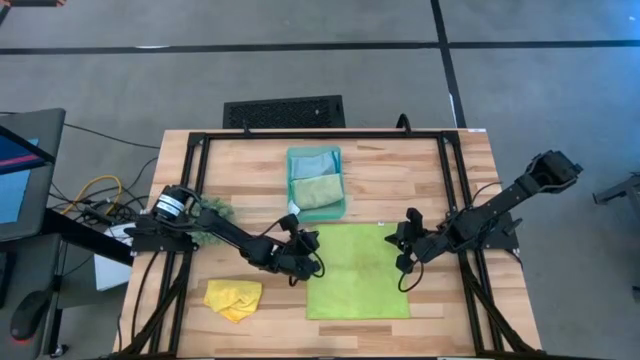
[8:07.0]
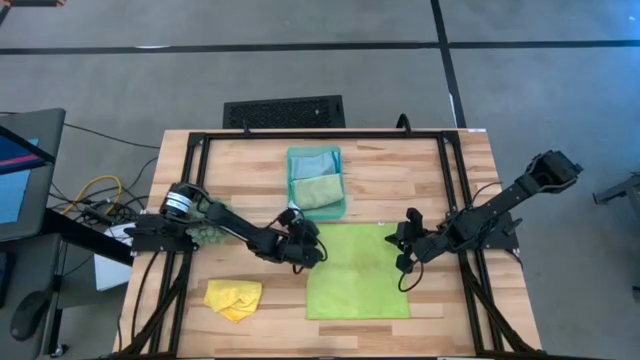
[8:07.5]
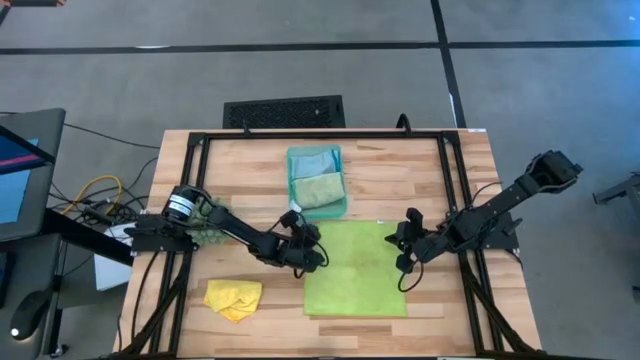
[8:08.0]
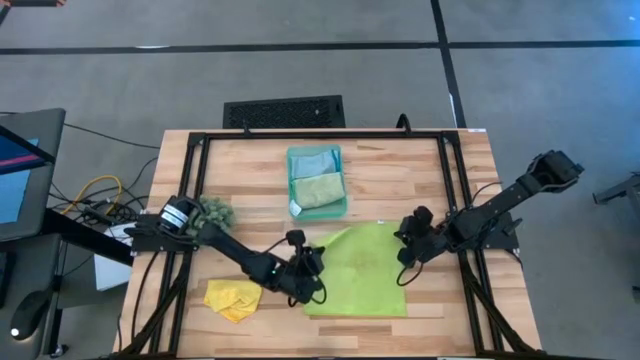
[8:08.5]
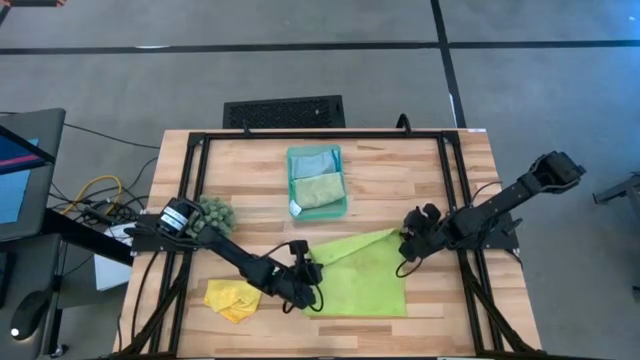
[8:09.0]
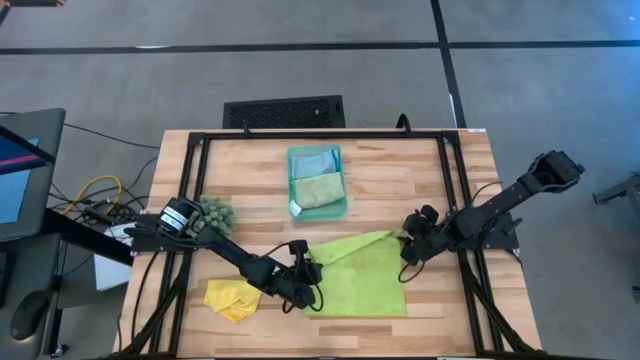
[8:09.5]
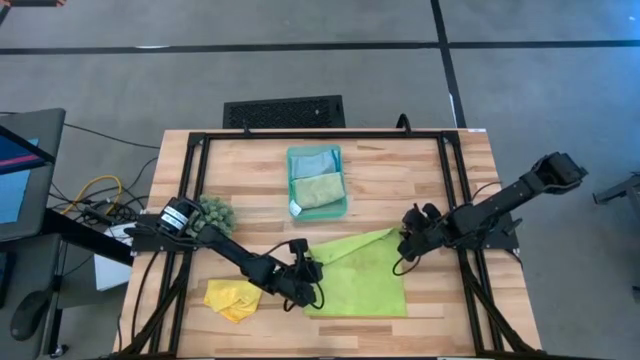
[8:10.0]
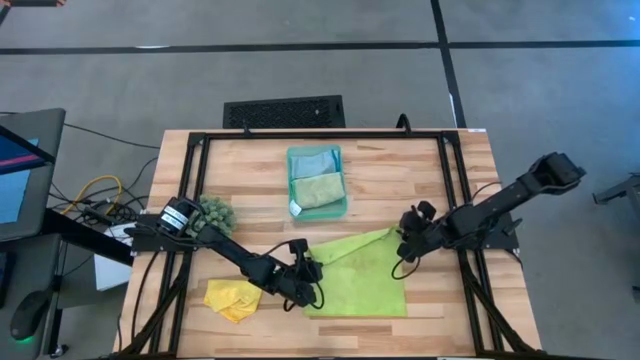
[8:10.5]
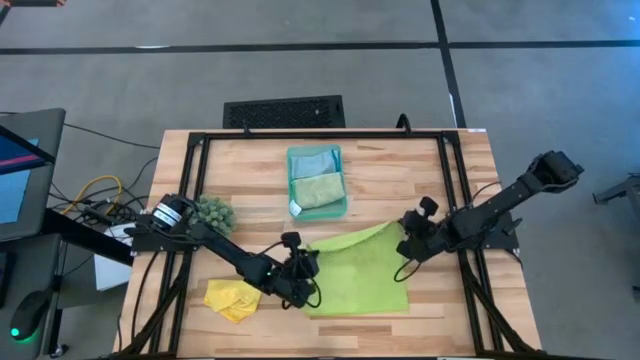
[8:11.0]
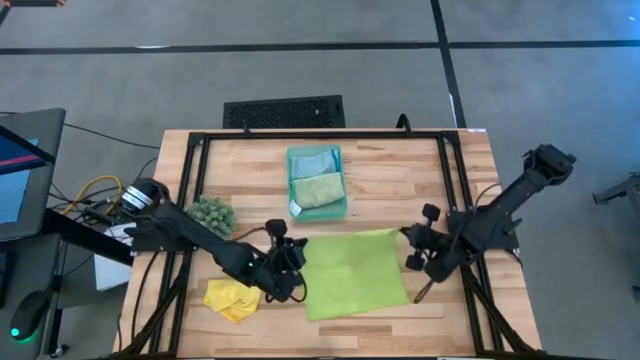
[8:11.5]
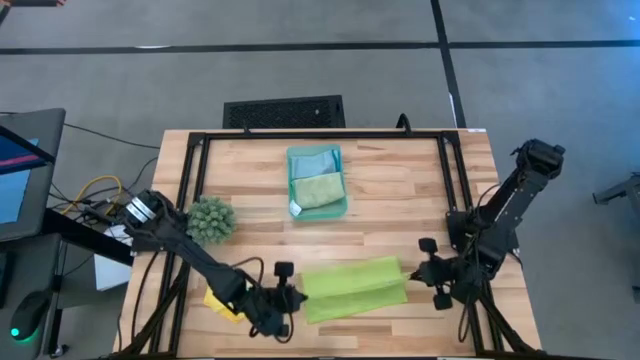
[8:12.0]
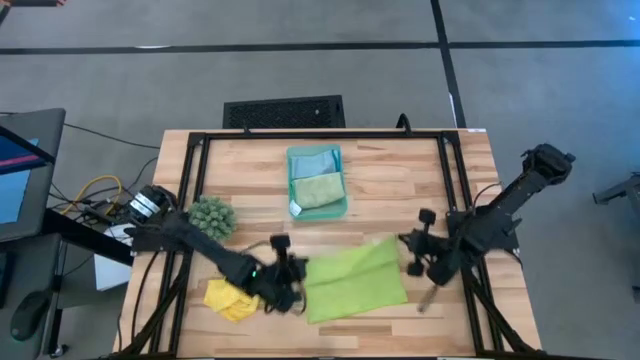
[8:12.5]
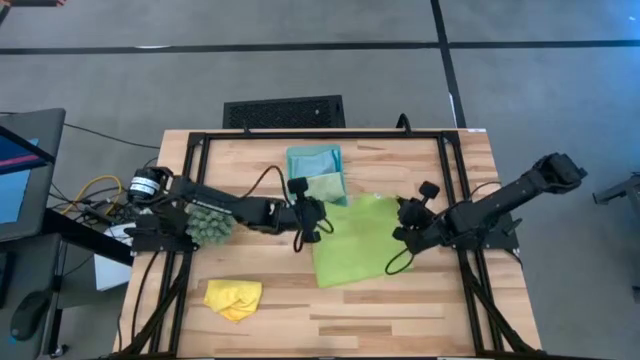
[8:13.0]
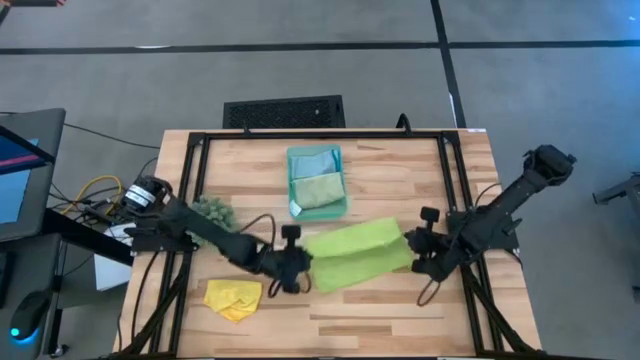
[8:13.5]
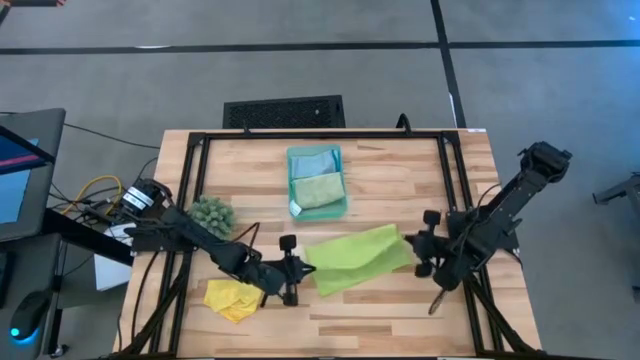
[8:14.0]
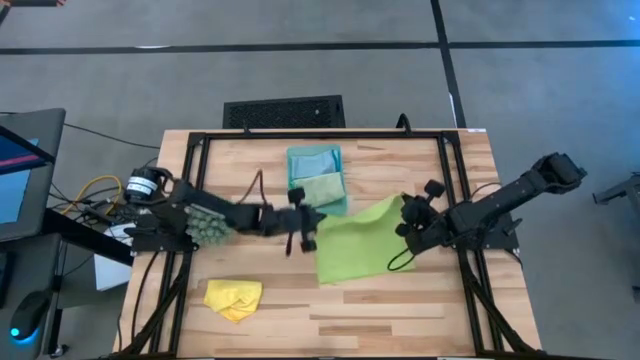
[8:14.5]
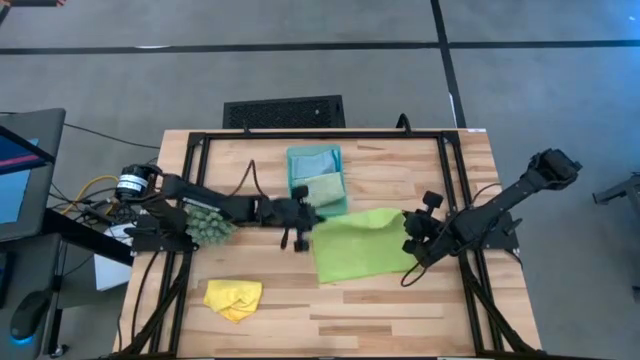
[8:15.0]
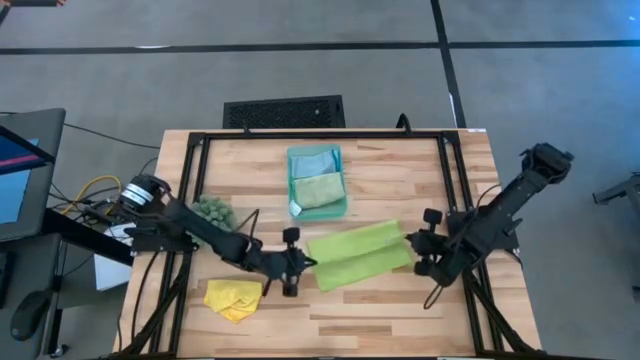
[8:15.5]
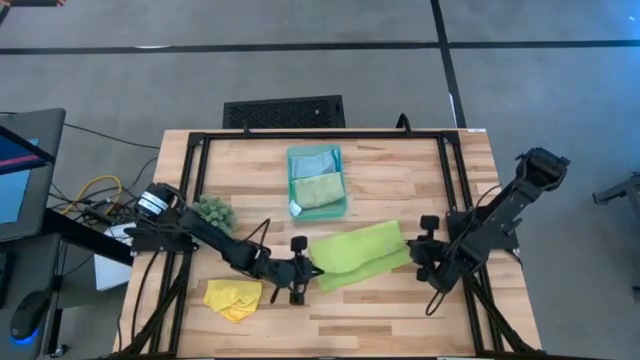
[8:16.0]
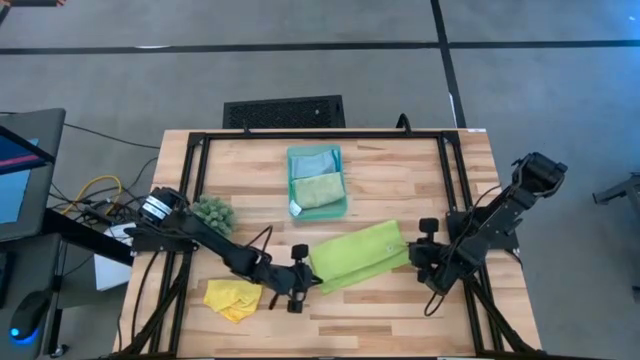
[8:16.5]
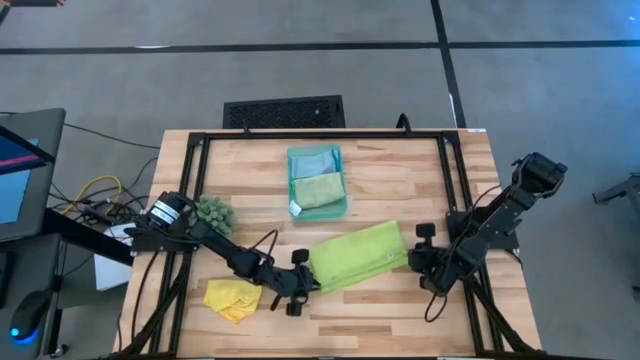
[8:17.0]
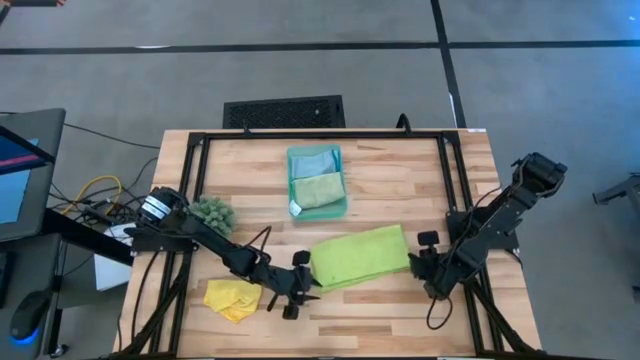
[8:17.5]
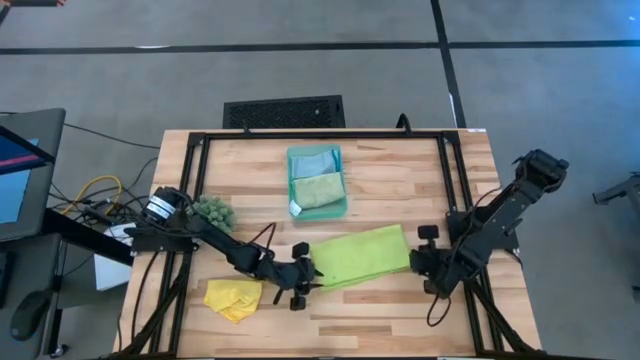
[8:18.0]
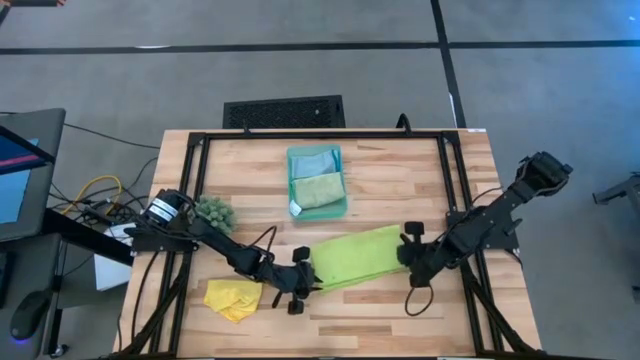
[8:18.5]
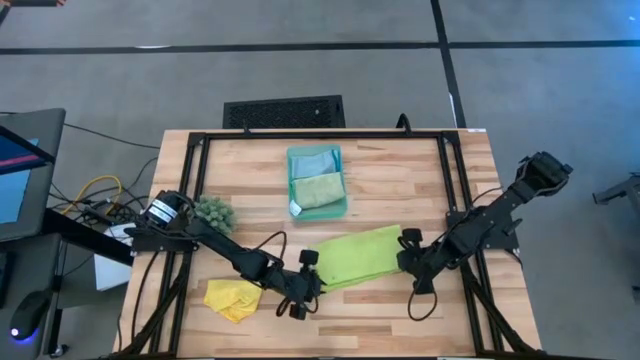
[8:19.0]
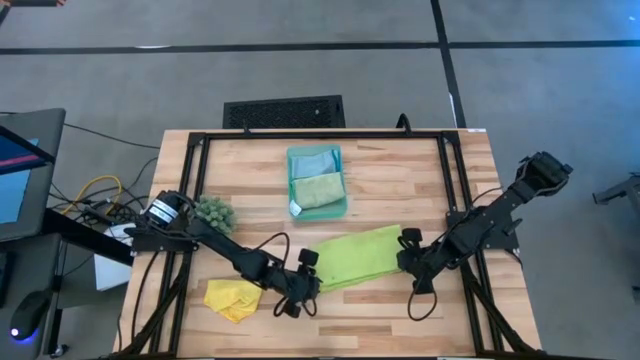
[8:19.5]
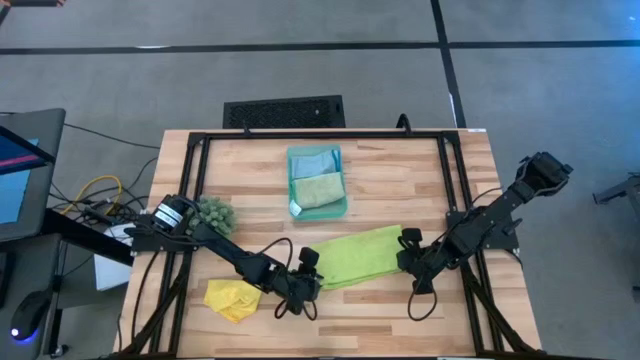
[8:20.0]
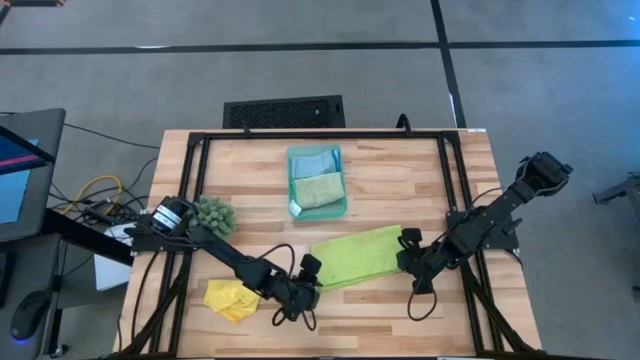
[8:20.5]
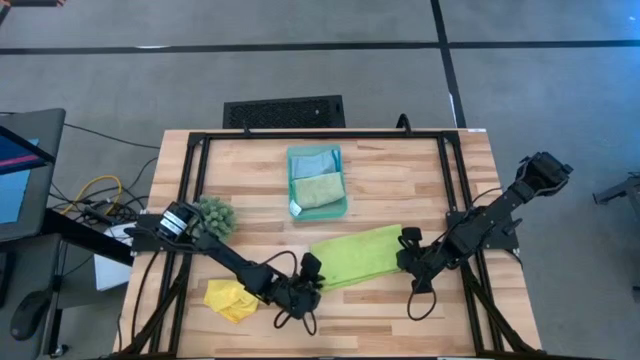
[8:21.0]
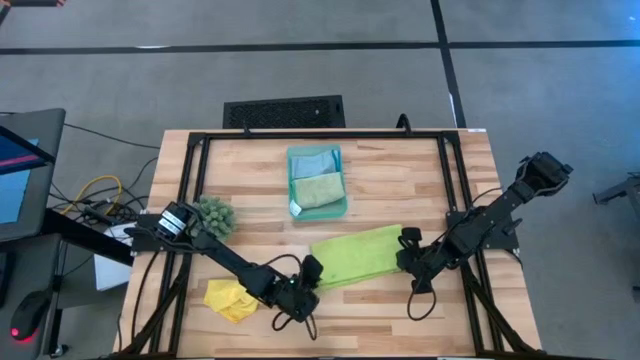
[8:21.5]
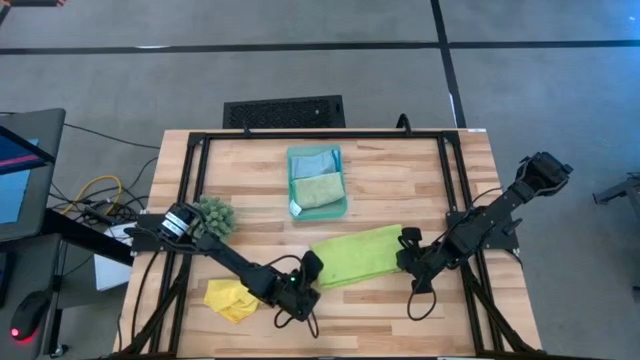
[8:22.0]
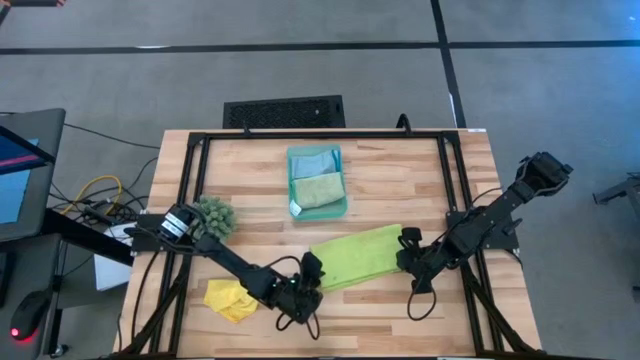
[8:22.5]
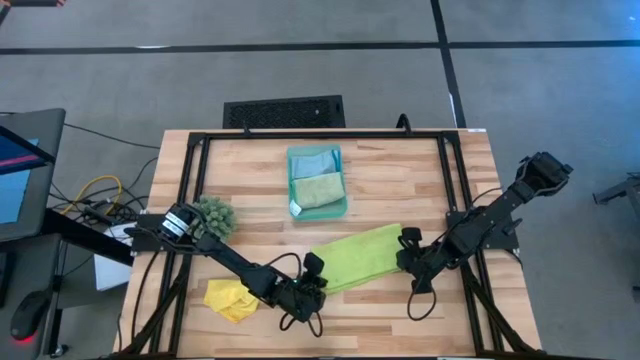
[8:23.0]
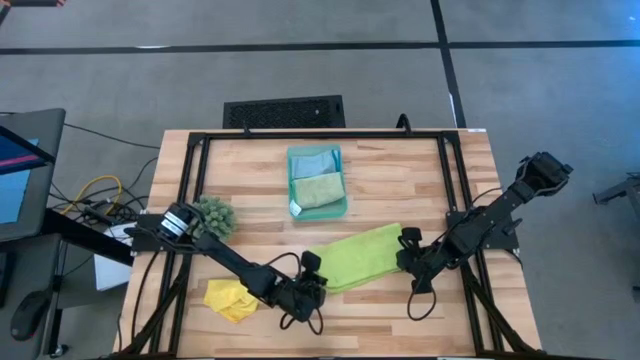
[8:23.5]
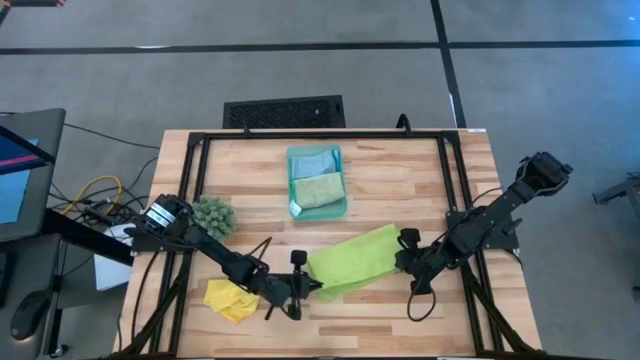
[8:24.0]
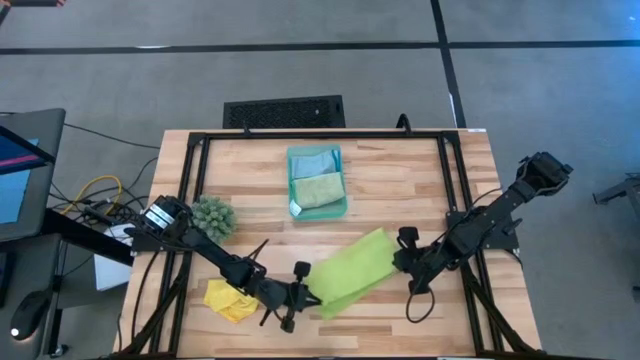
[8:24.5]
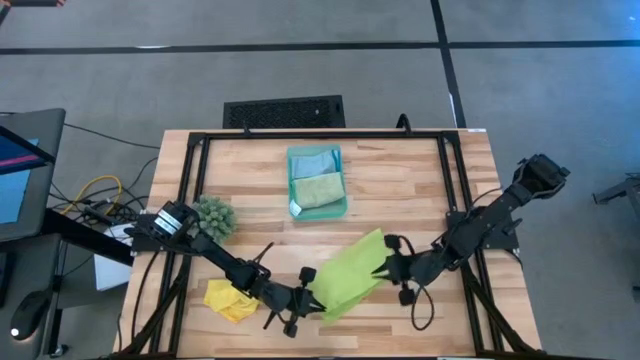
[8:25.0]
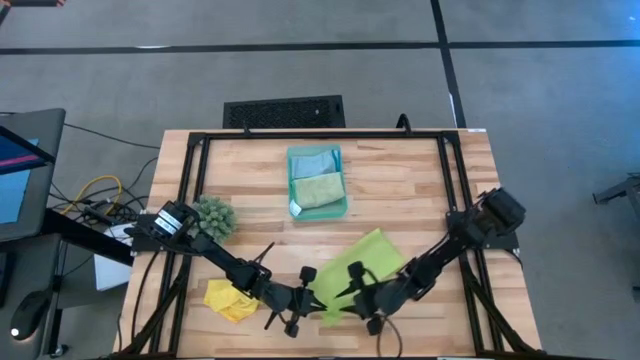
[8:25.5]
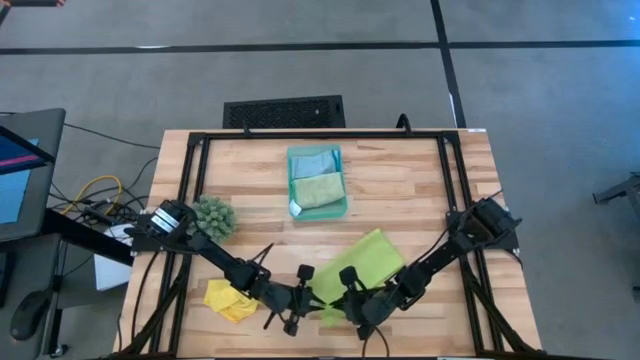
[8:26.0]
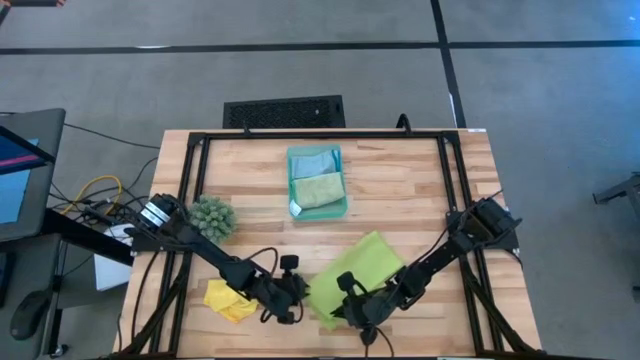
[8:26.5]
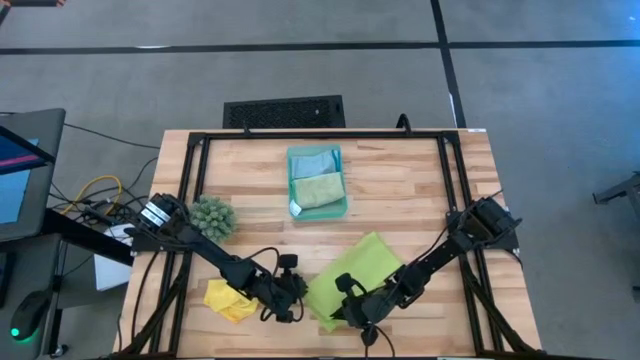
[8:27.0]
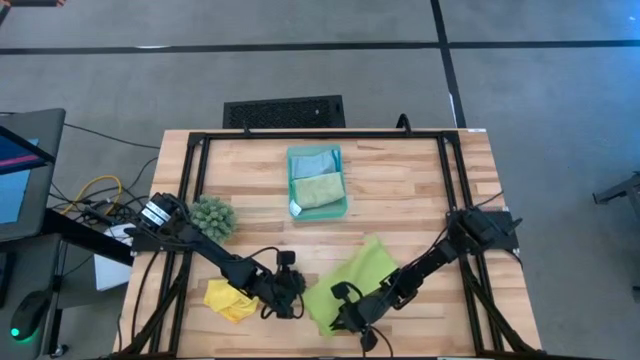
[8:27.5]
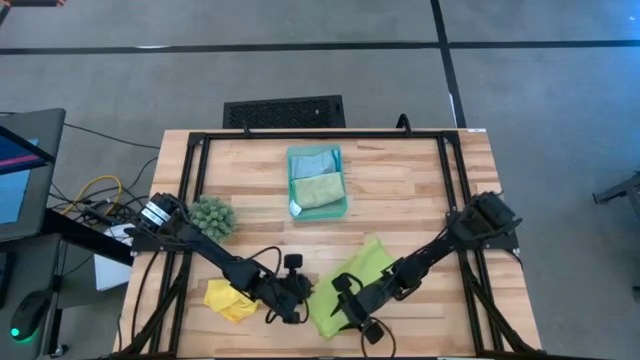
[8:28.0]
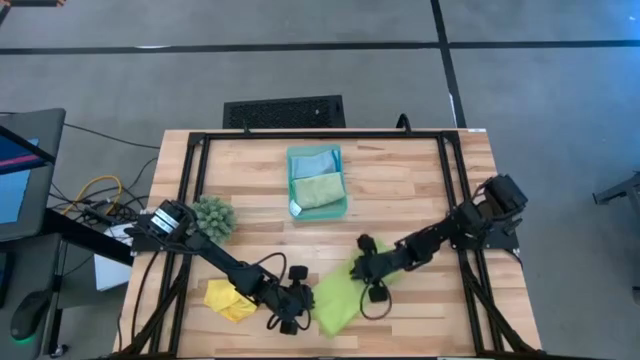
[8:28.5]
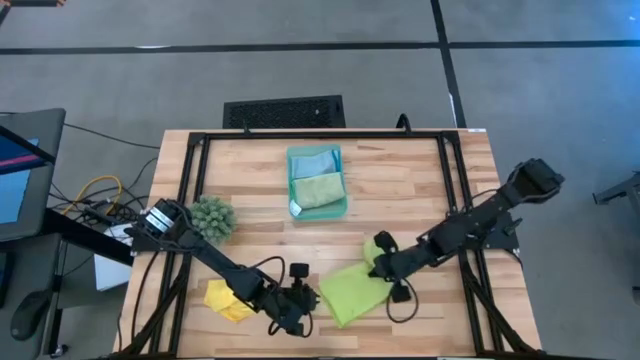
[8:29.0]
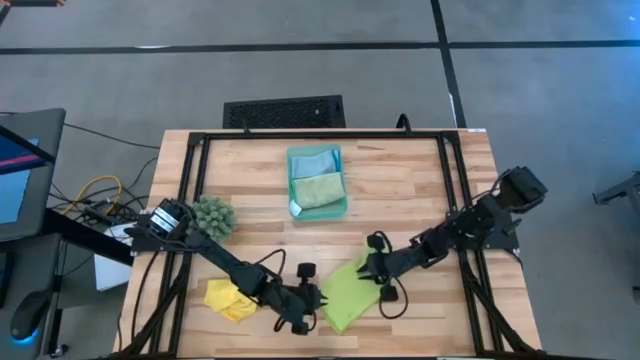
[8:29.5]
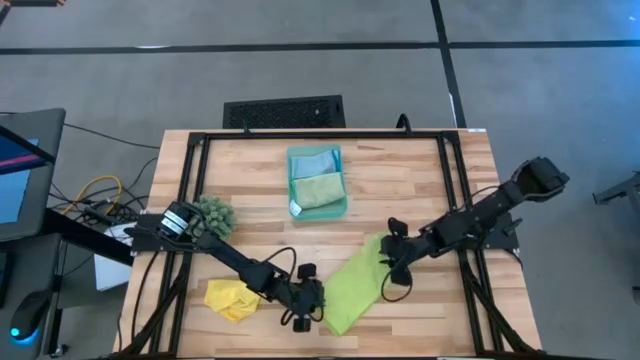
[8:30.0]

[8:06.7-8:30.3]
Task: Fold microfiber towels
Fold the light green microfiber cloth
